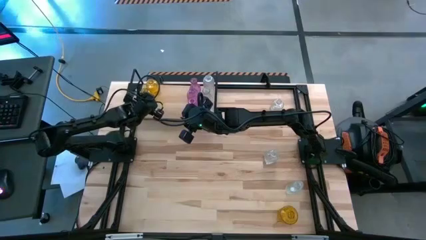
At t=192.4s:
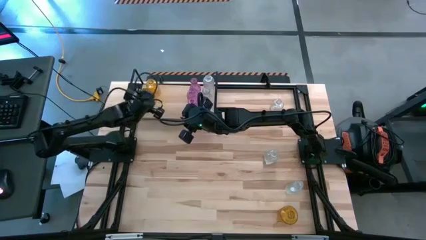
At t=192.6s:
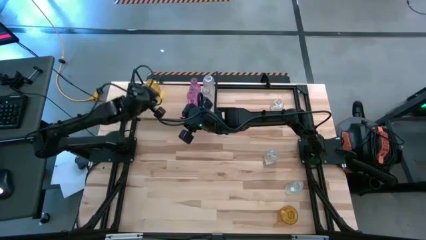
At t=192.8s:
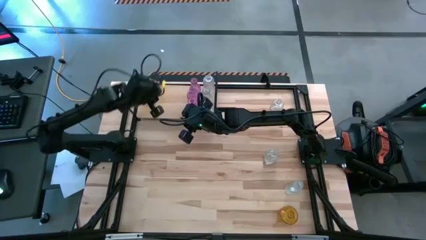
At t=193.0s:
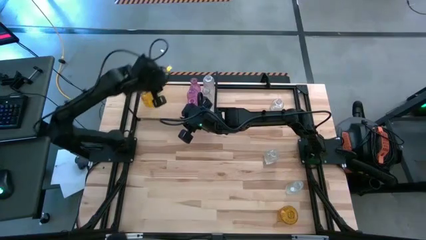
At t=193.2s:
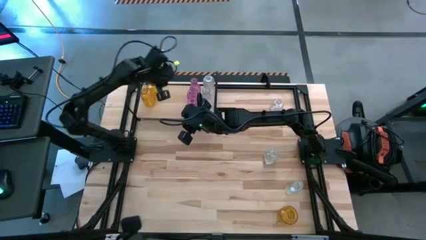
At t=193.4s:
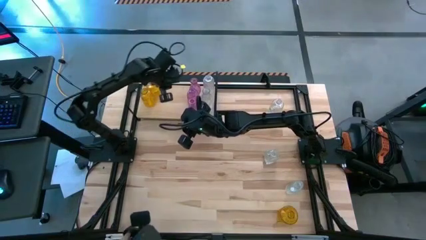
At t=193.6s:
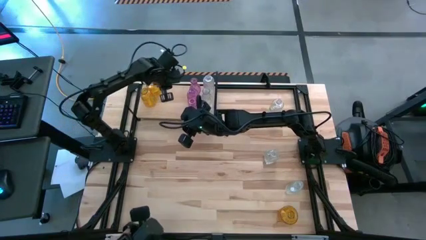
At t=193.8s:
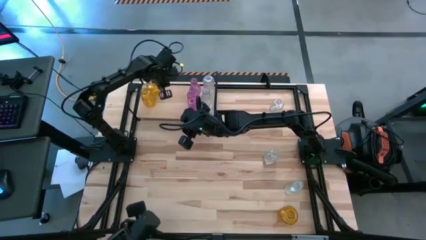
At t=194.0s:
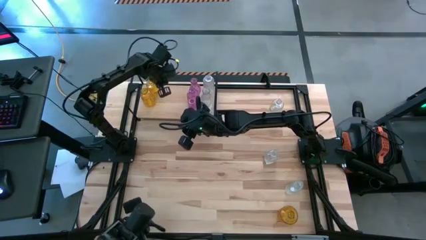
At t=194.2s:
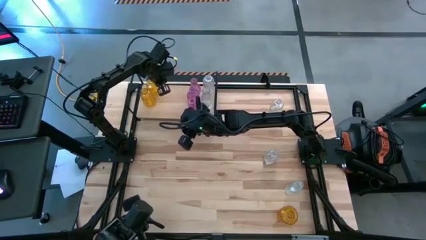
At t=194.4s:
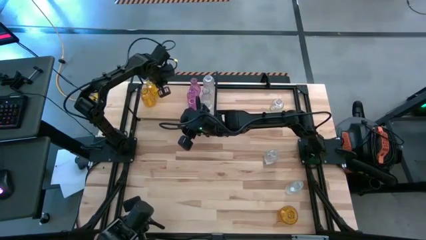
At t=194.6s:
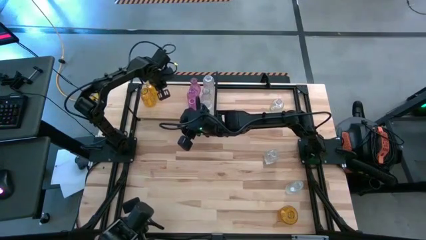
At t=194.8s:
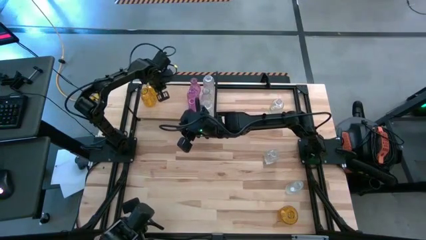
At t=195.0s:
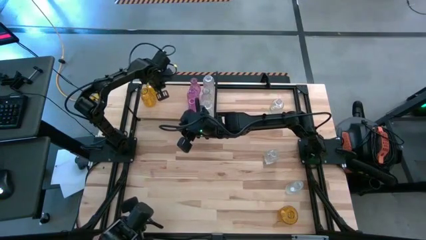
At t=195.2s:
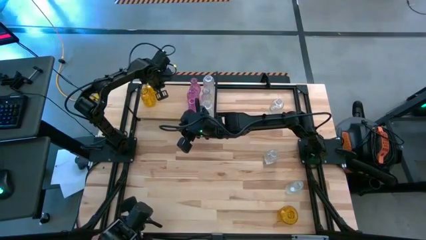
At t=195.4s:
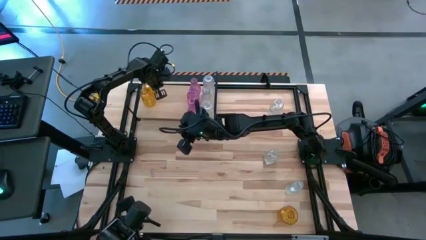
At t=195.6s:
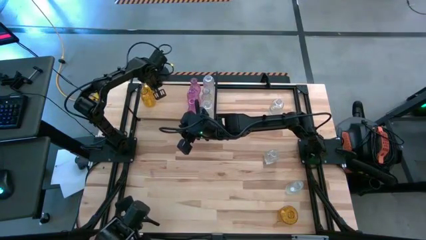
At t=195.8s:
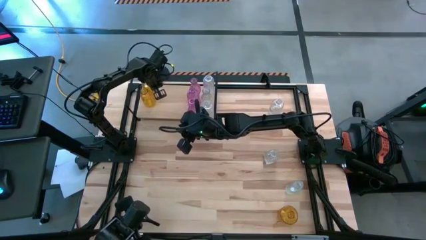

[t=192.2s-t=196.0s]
Task: sort vases onto shelf
Adjust the top yellow vase on the shelf

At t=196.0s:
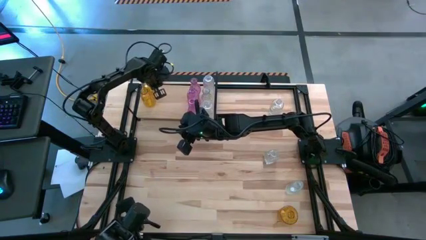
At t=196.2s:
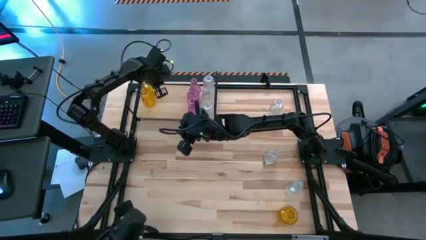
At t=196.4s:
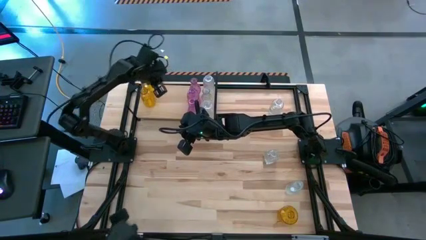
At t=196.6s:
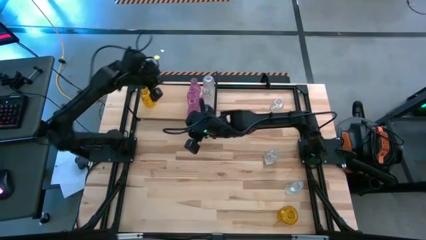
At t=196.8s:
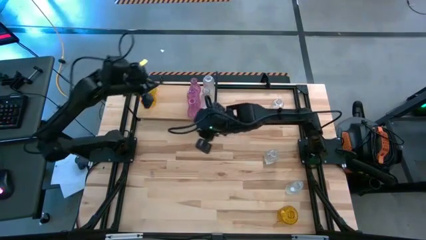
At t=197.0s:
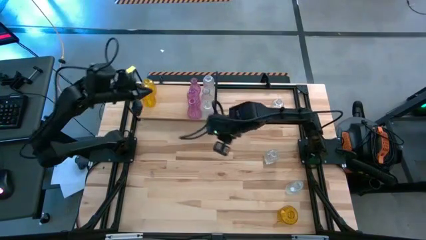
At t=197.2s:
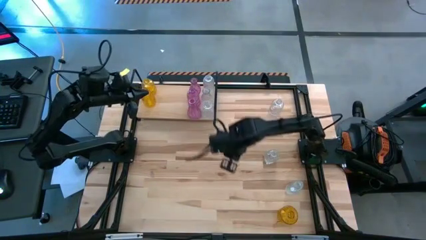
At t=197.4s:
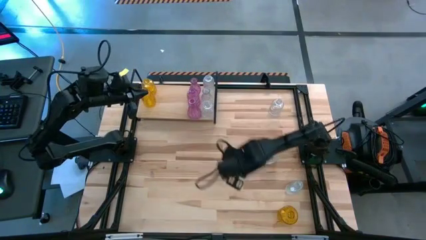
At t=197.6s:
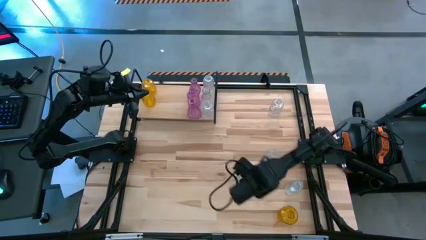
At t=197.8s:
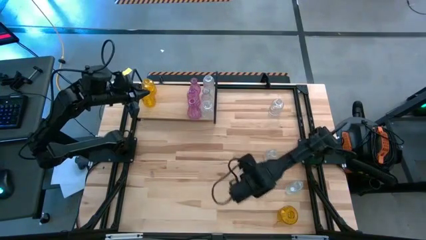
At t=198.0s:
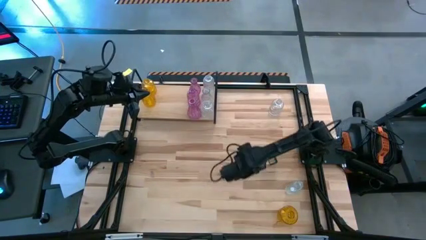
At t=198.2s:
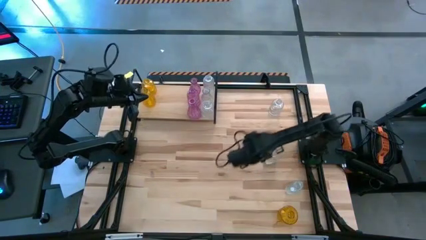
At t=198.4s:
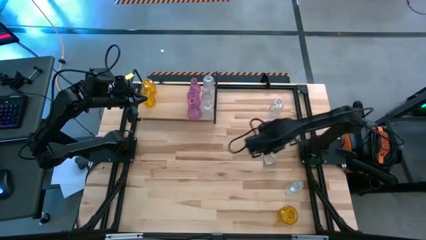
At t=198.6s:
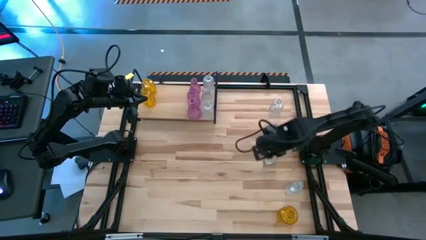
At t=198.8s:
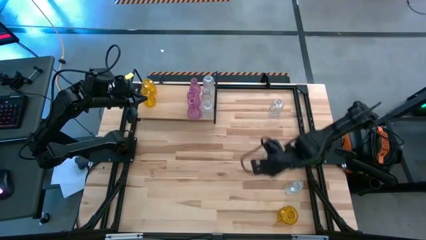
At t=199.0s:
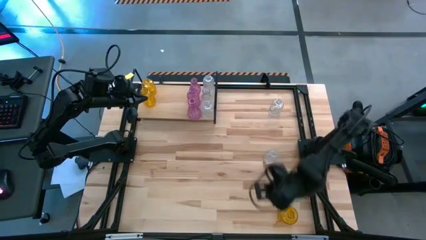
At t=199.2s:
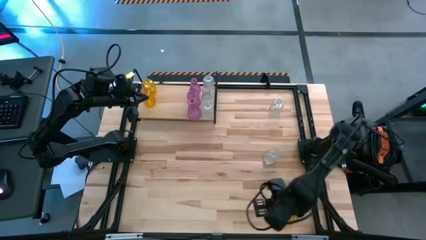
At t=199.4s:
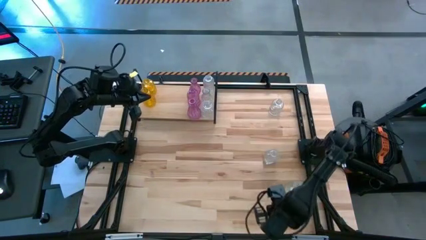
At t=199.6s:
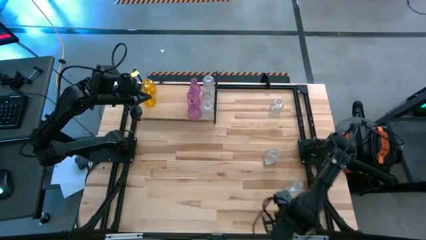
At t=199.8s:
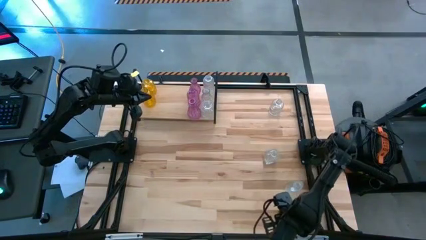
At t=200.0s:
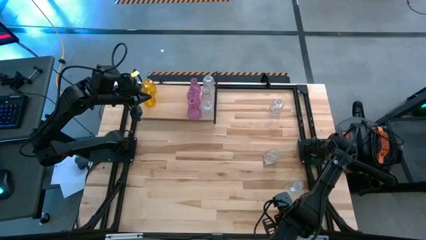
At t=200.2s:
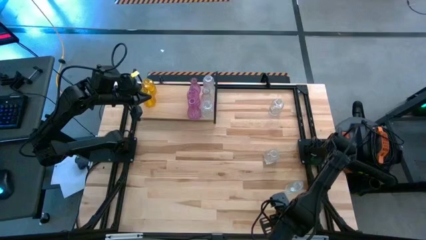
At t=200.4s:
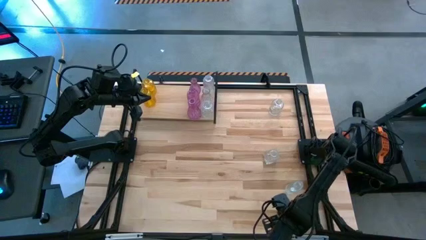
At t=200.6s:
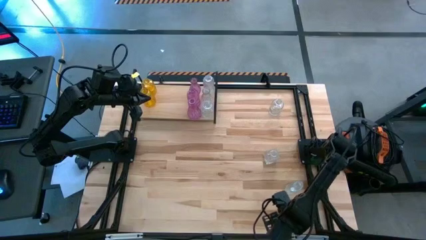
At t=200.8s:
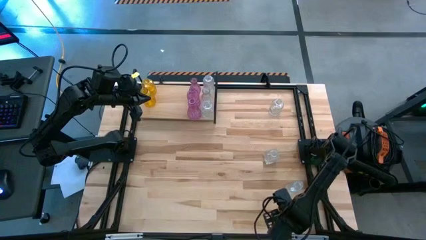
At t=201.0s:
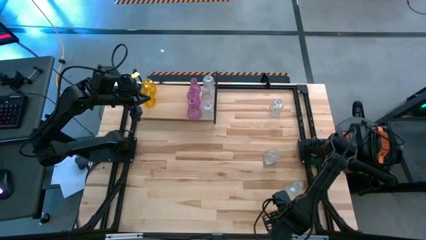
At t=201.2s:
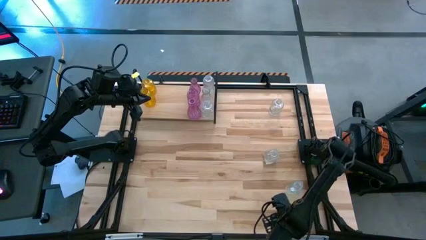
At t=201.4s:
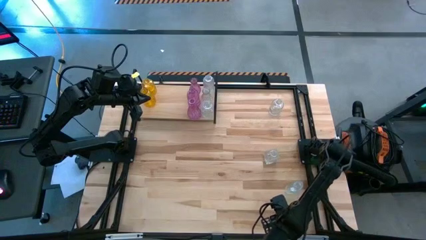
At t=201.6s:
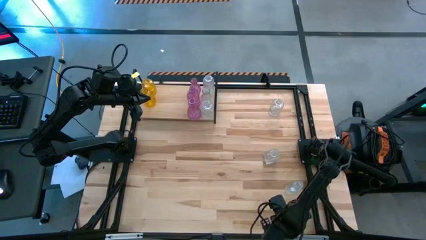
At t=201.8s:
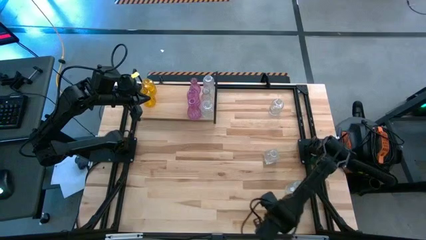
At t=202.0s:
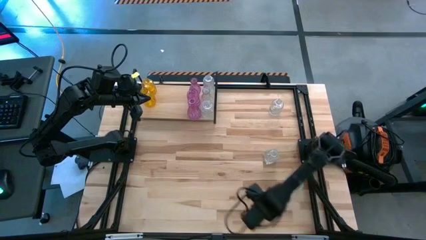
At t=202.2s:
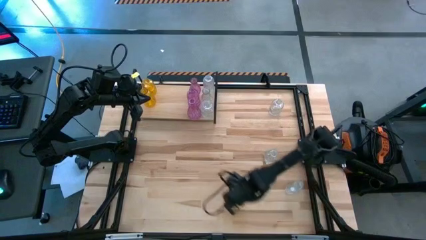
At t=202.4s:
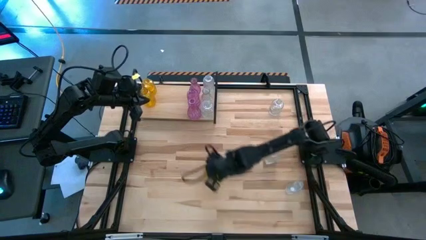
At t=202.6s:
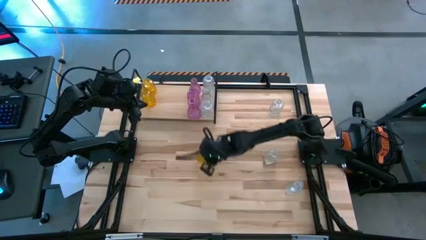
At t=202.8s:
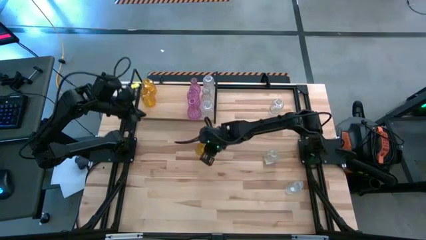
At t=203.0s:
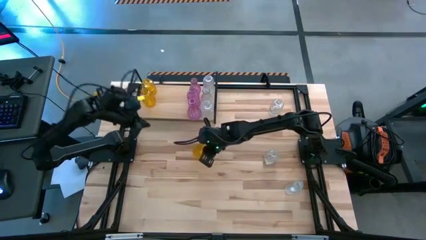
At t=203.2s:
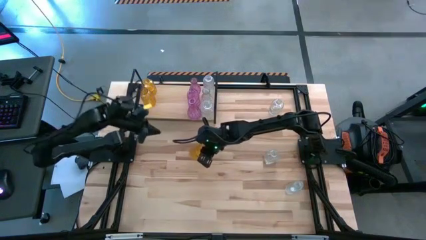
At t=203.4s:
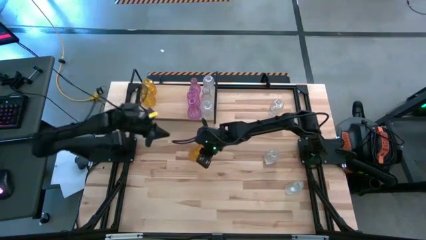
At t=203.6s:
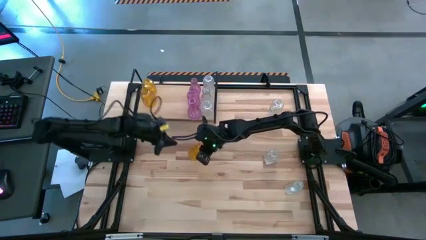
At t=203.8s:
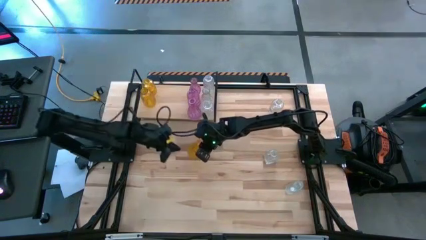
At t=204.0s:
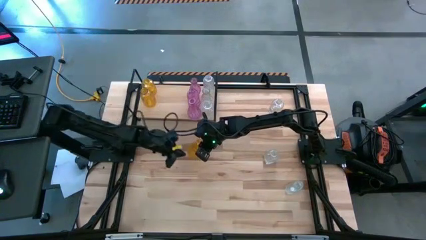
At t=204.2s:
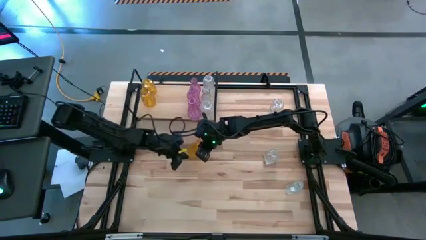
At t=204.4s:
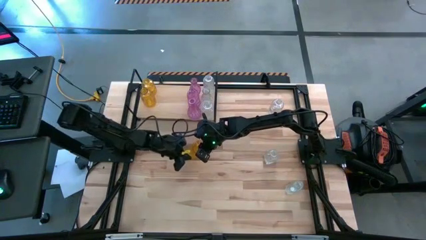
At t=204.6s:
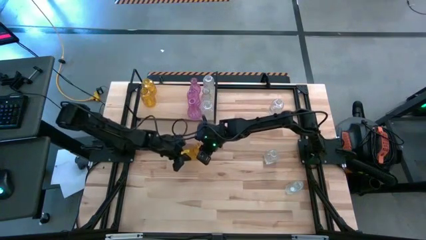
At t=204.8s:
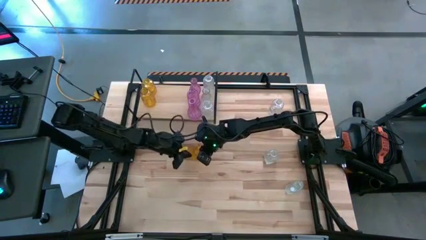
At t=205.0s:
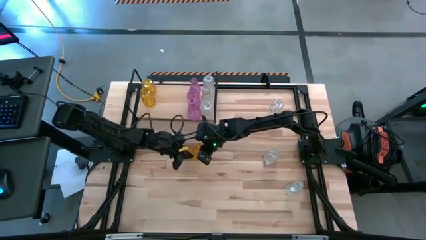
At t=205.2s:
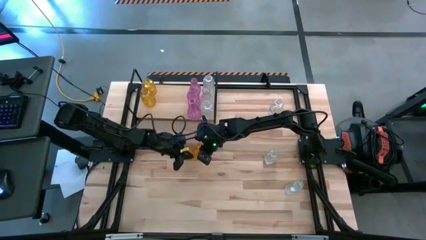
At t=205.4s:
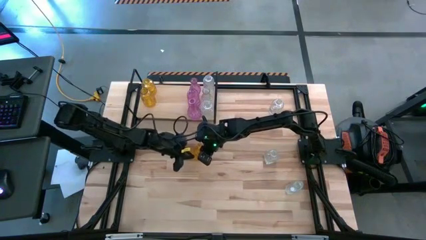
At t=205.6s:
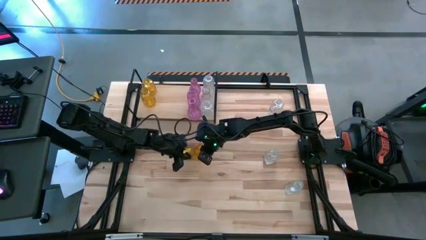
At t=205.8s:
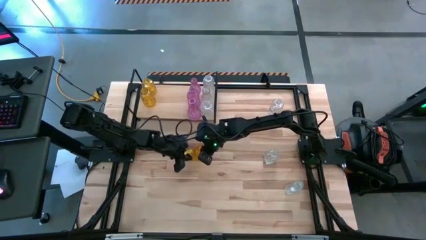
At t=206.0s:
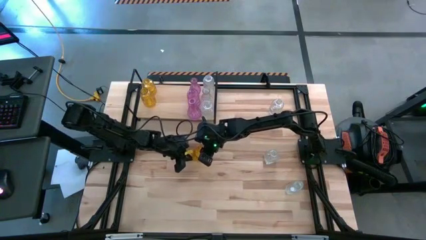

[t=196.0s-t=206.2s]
Put the yellow vase on the shelf aligned with the other yellow vases

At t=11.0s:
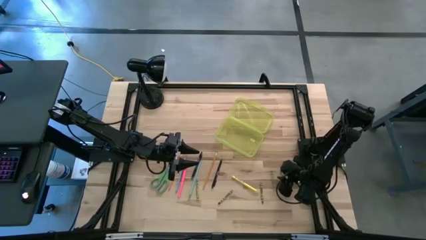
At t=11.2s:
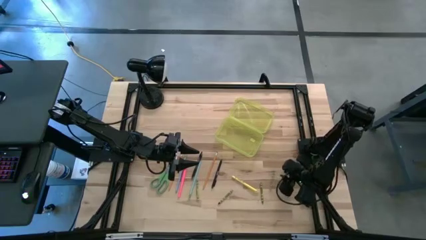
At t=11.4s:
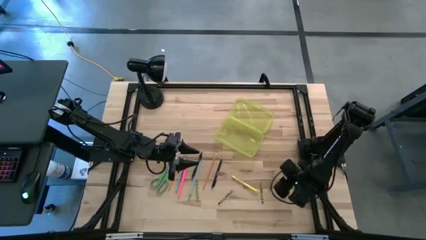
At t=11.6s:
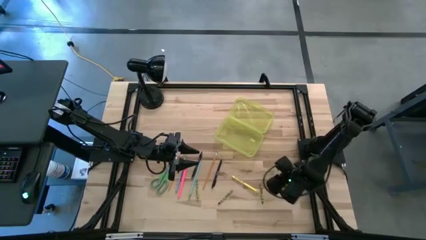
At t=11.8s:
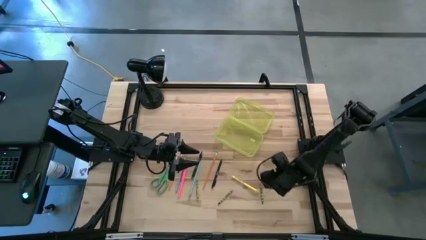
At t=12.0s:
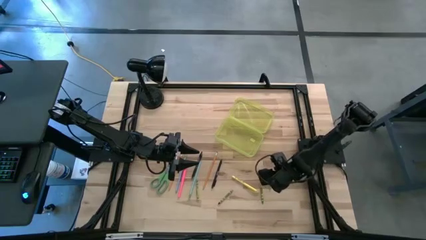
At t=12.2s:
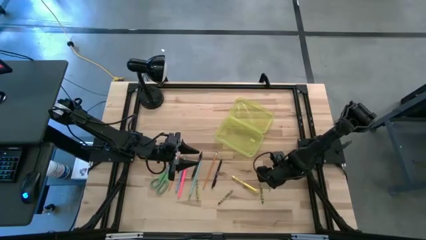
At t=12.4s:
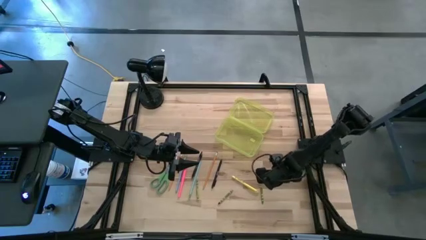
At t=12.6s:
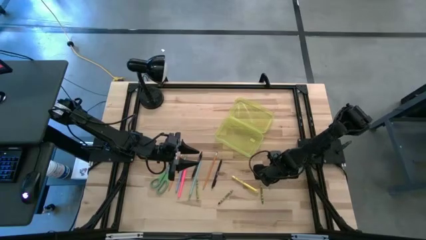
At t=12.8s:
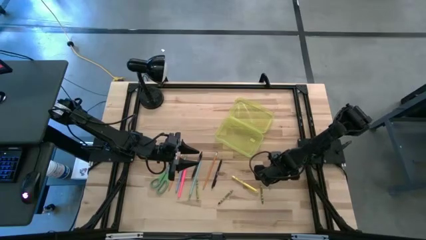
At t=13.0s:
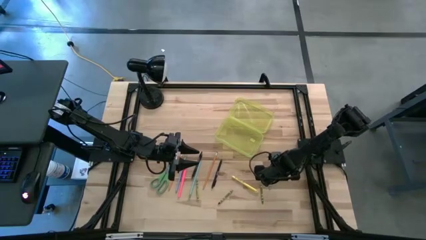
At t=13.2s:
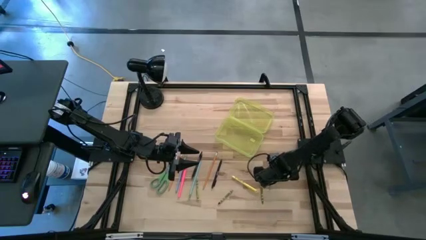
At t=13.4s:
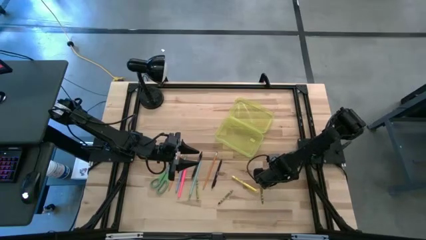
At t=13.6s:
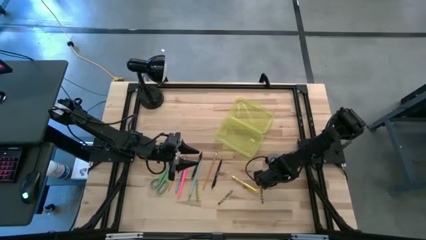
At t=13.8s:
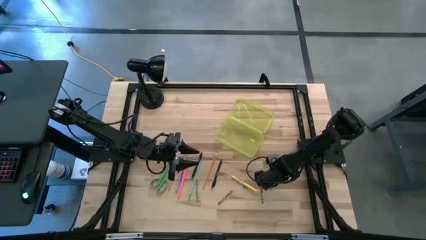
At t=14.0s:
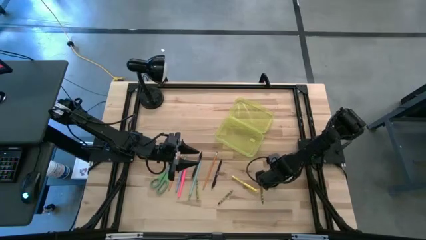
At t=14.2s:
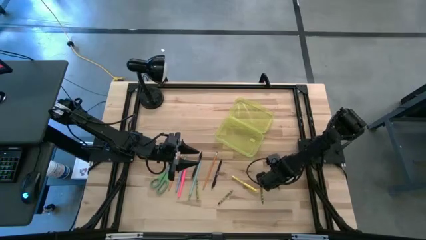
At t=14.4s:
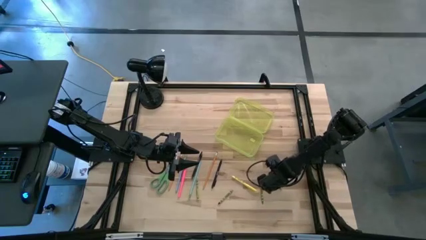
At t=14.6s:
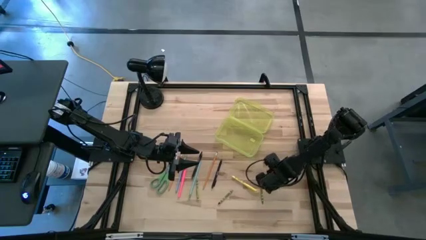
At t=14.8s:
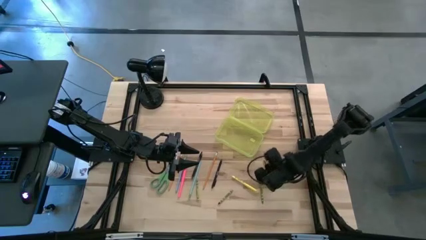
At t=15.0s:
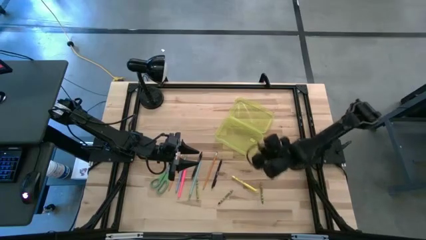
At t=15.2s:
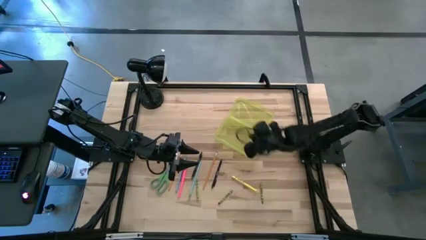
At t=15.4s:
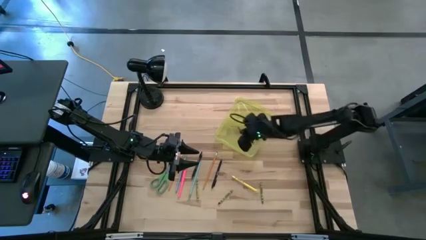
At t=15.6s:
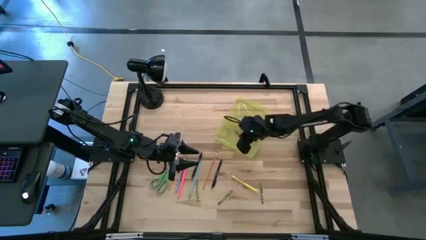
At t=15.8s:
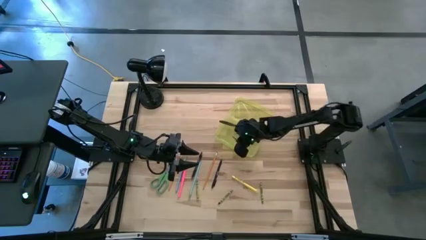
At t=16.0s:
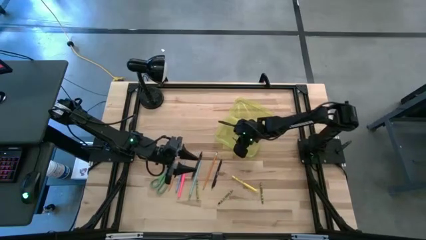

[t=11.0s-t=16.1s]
Task: Pick & place school supplies into a supply box
Put the light green crayon into the yellow supply box
